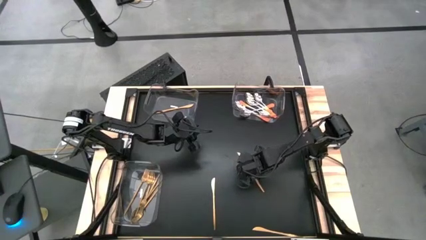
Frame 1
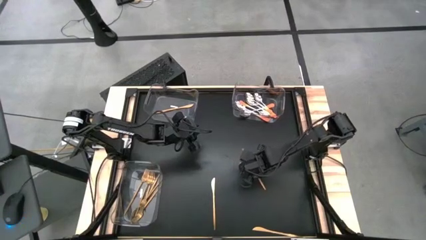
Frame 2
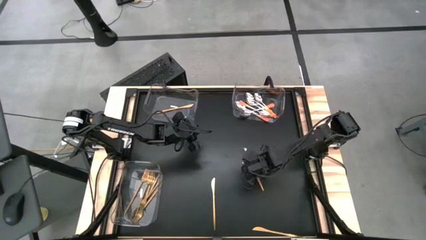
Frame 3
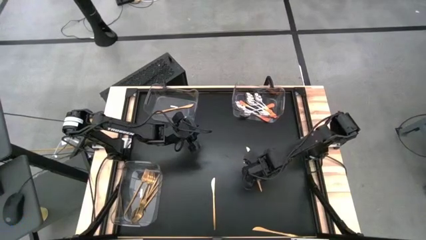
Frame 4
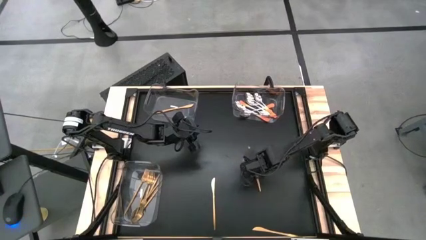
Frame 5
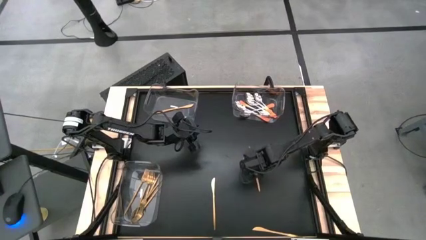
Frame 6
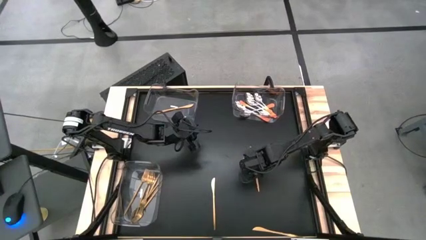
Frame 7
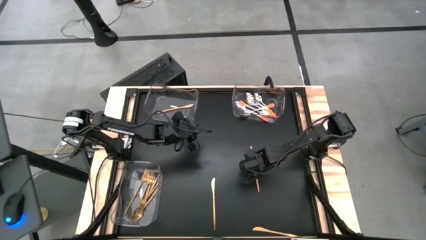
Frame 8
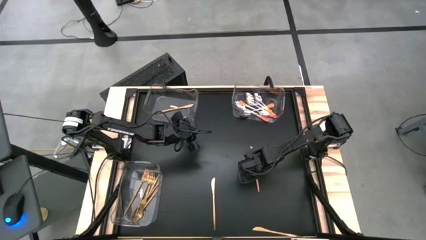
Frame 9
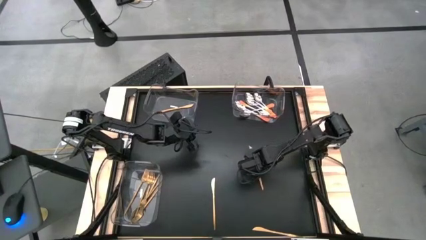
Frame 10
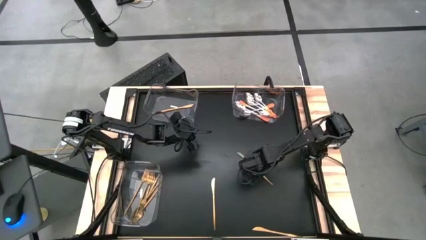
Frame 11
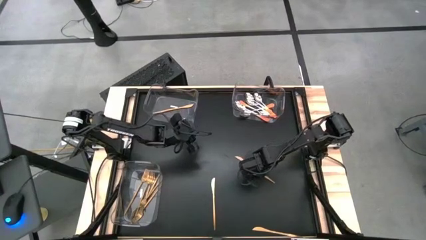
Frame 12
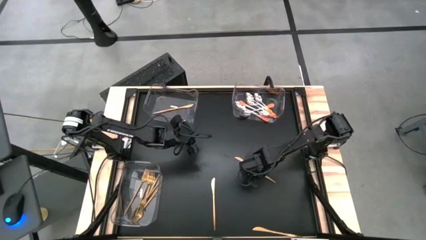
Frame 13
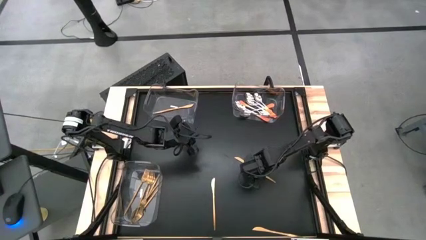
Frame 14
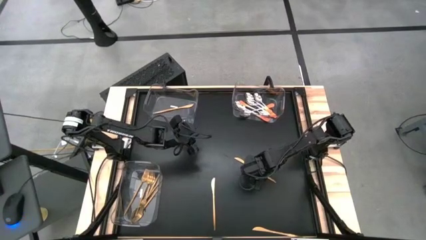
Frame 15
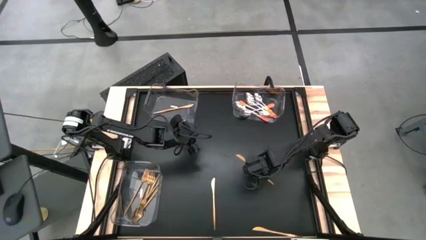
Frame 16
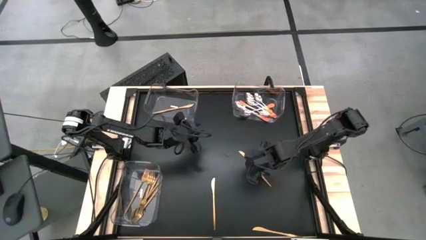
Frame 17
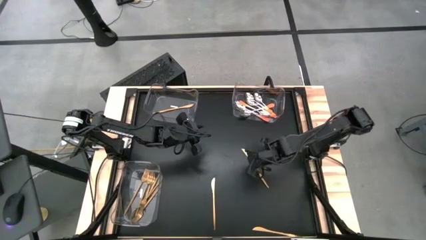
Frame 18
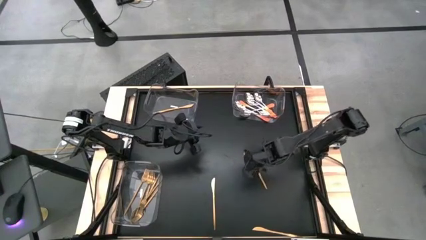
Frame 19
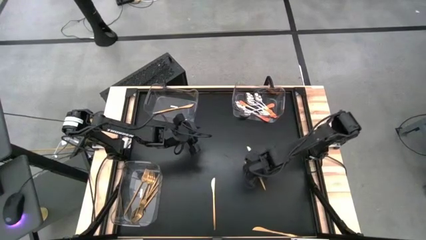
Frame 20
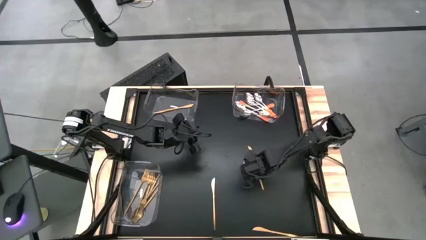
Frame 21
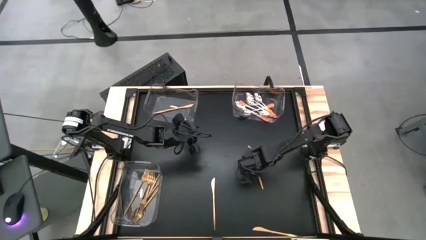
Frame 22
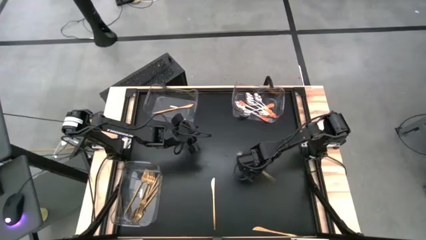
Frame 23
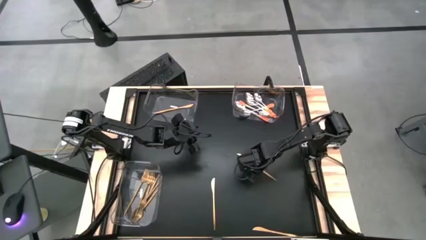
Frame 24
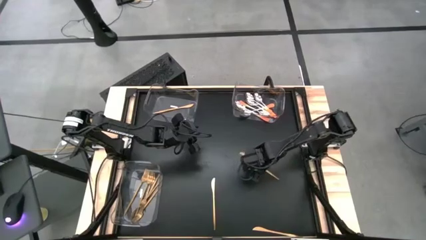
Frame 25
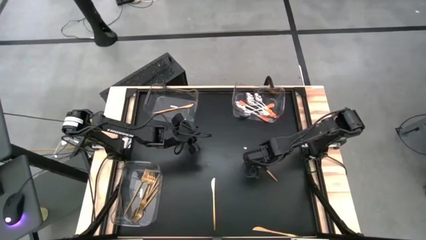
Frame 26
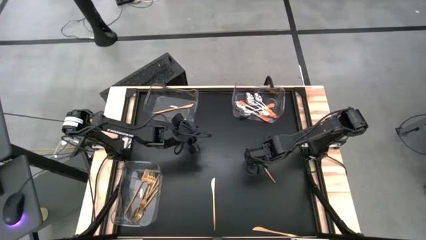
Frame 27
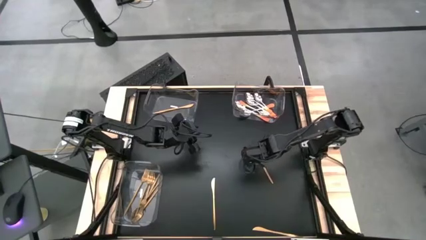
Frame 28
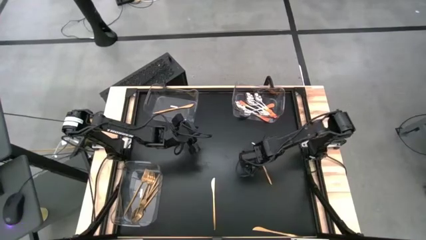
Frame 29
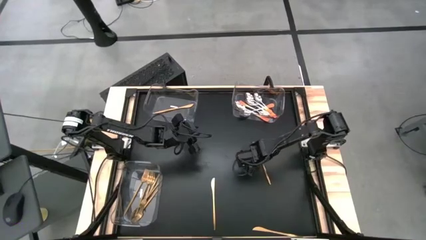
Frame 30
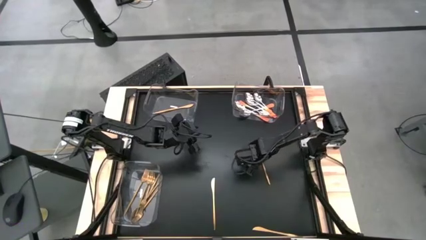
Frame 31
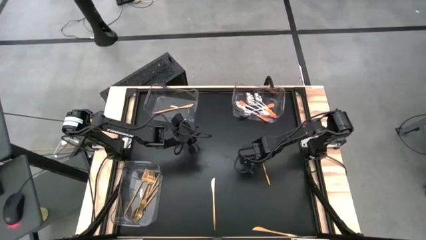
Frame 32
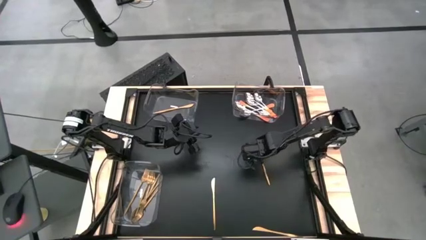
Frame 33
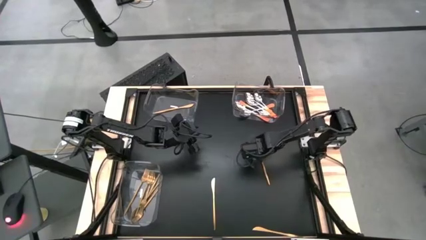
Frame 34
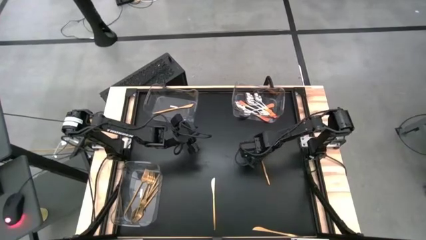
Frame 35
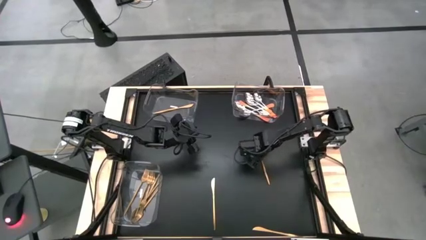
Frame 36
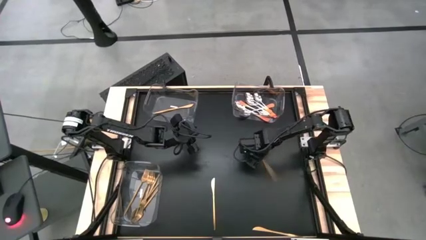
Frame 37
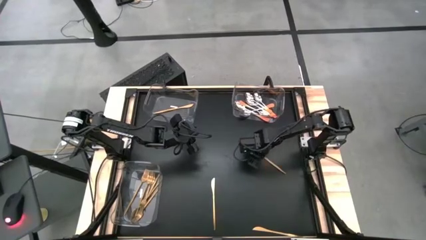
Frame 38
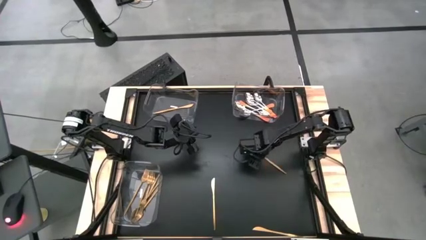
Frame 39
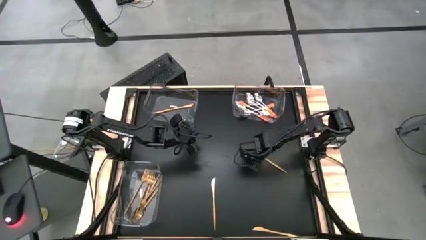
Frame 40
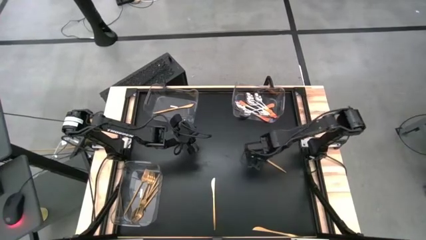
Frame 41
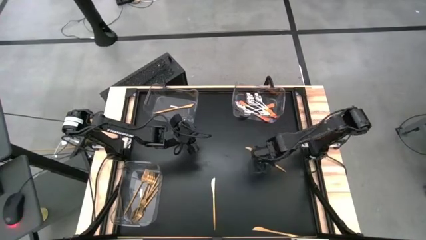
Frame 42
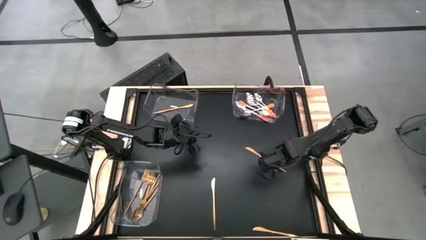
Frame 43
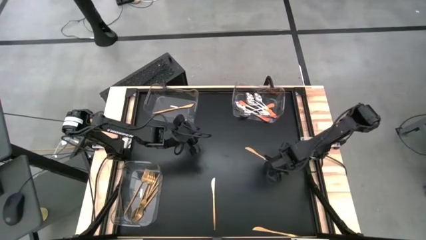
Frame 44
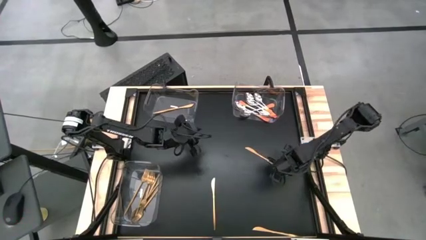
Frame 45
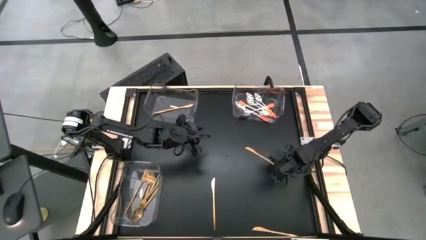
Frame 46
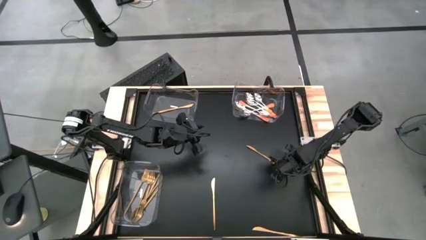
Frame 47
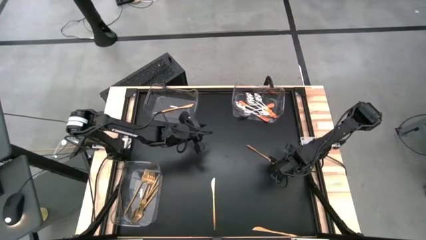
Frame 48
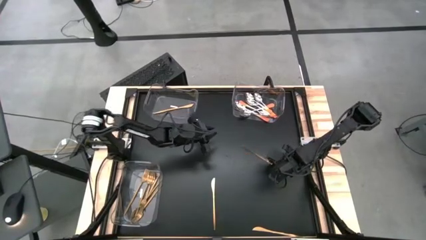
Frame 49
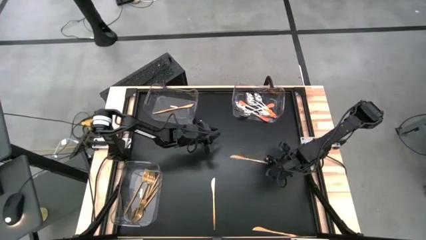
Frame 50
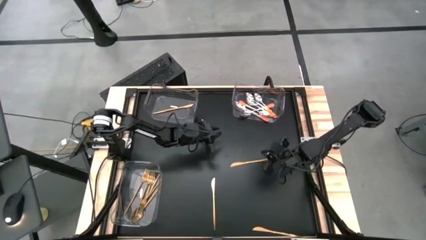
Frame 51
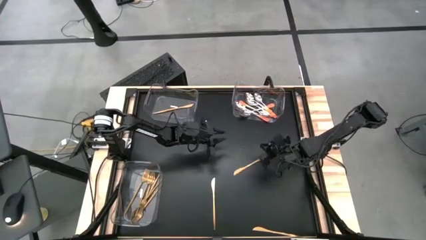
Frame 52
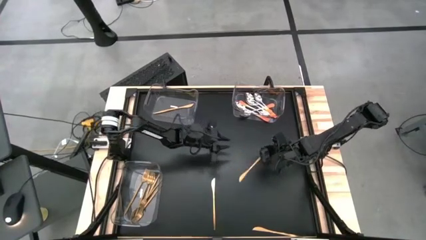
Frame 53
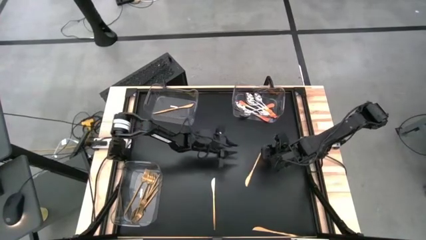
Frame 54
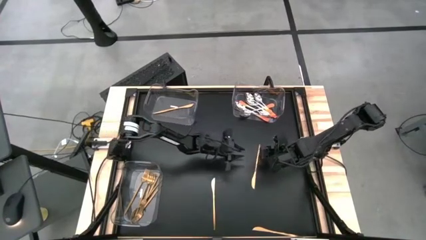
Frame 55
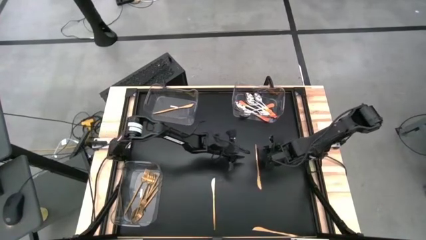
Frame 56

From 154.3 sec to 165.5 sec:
Task: Sort silverware by color (type)
Put the gold table knife into the top left transparent bin

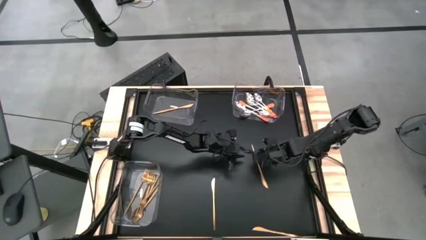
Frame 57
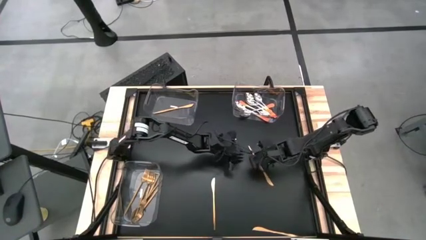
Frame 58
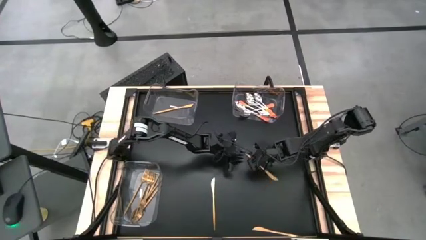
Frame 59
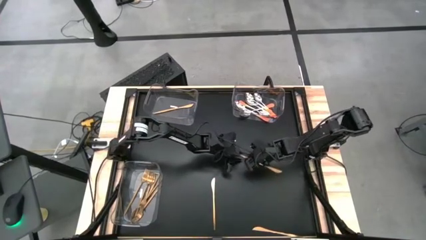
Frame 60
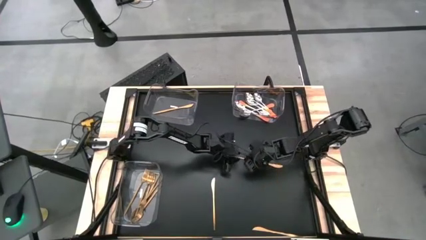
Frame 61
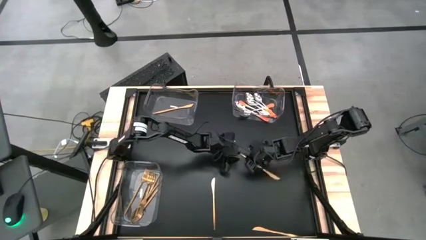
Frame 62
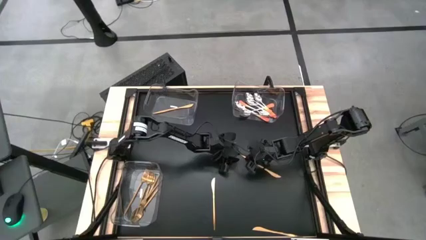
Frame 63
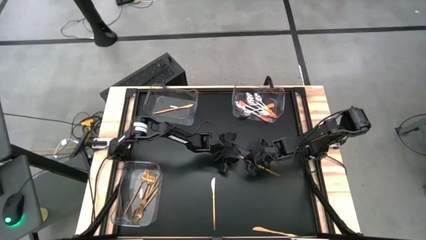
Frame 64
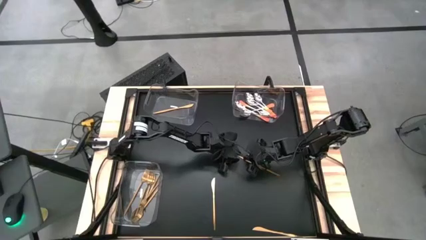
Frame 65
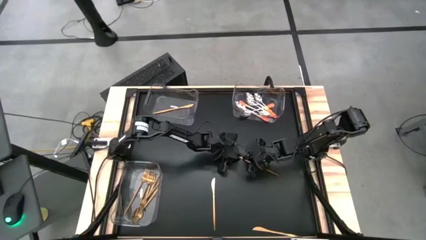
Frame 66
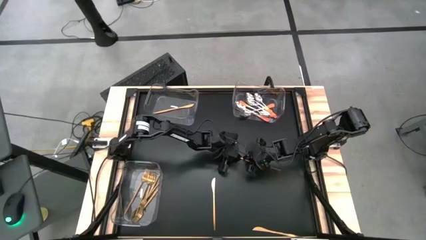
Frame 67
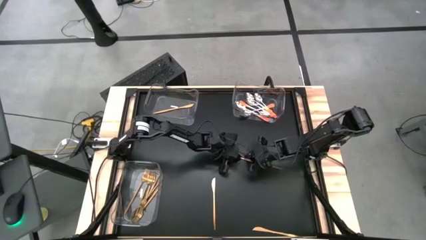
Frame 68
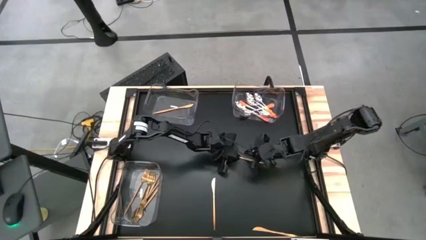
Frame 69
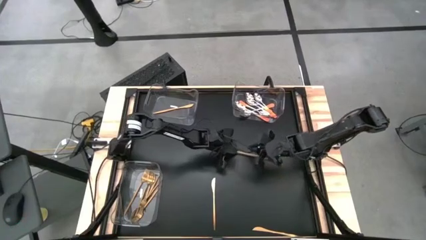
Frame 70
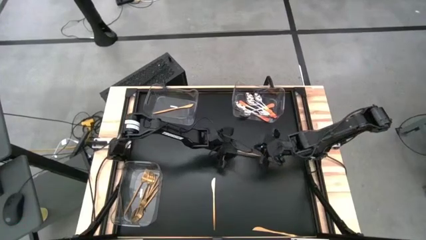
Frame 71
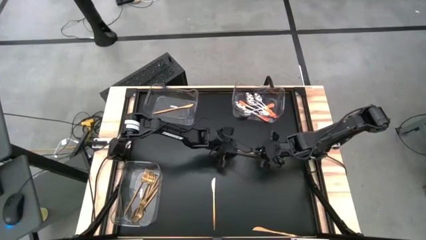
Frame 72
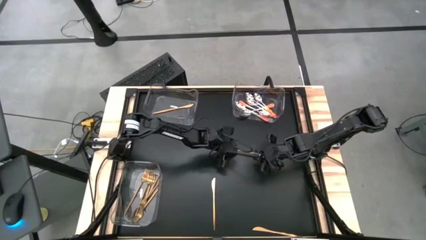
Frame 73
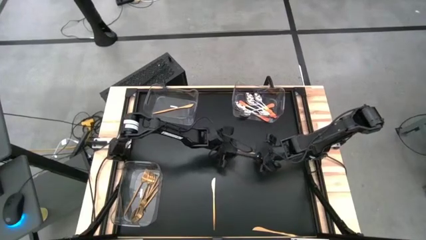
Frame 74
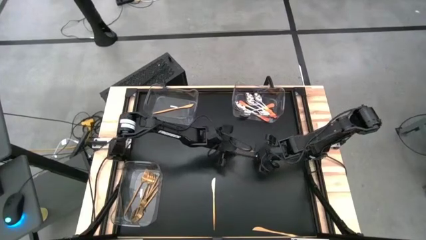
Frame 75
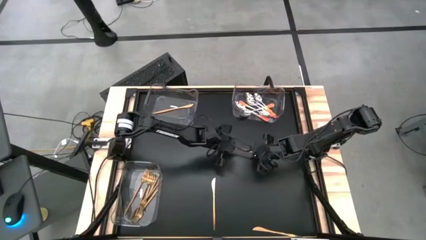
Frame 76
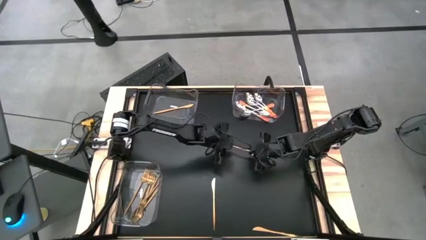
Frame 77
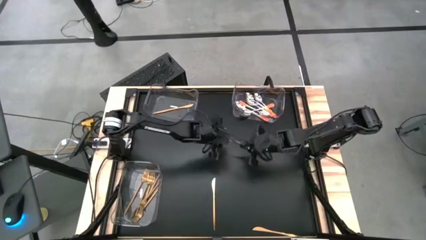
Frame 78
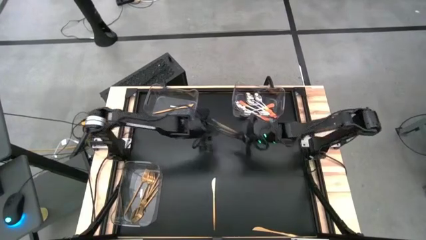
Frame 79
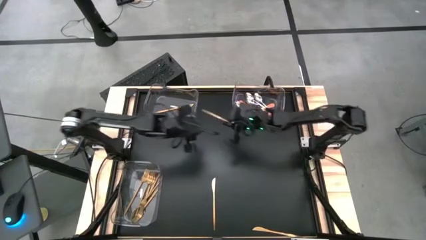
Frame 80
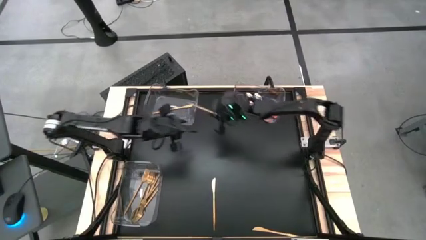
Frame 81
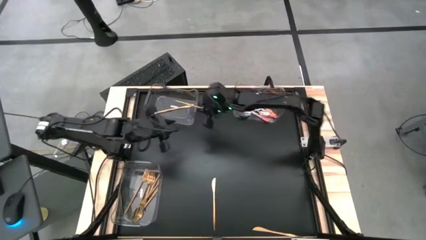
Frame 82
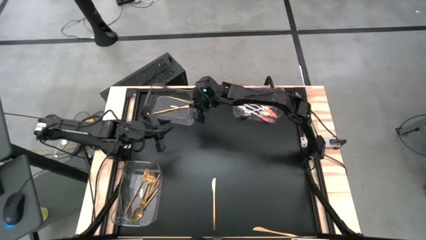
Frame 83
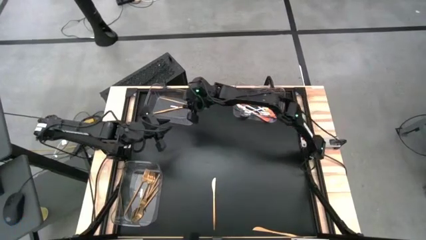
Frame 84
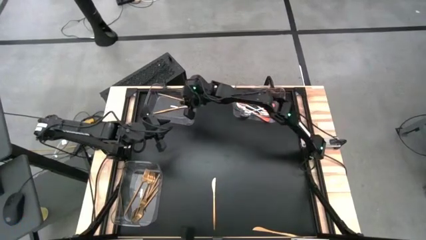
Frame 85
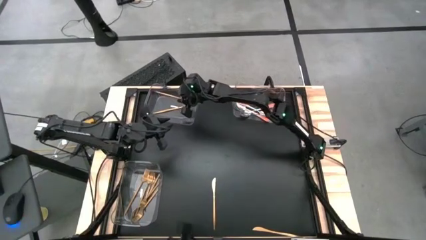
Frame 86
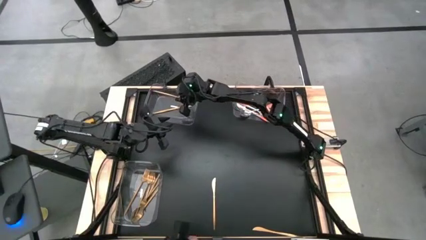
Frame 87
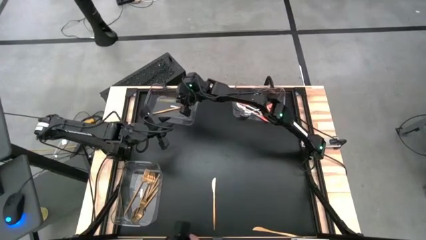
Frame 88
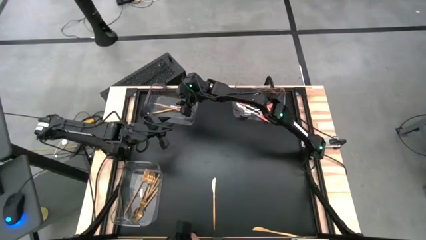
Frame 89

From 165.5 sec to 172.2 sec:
Put the gold table knife into the top left transparent bin
